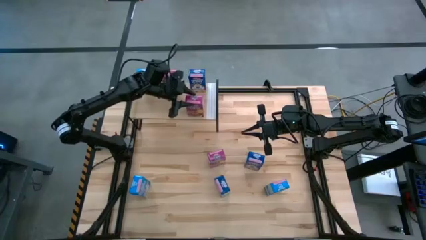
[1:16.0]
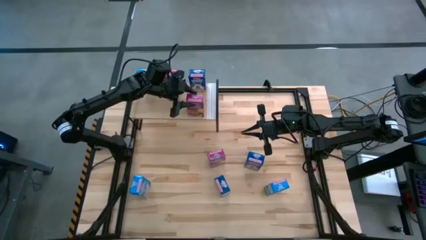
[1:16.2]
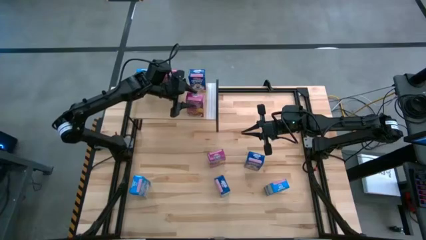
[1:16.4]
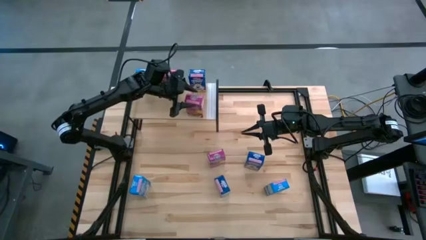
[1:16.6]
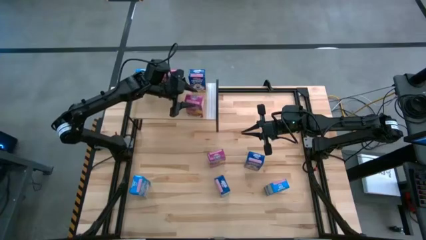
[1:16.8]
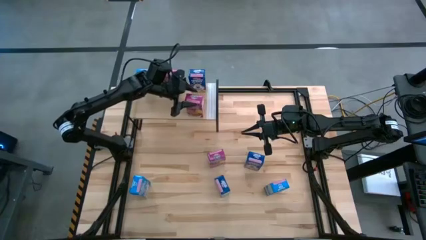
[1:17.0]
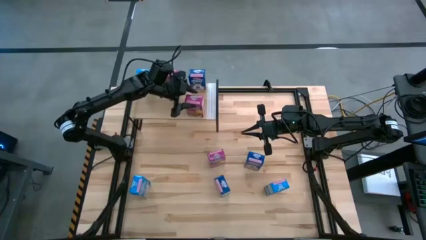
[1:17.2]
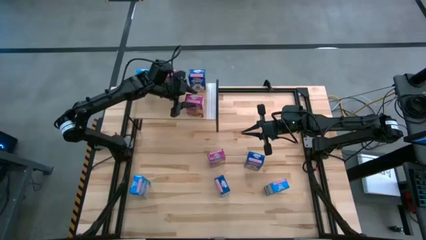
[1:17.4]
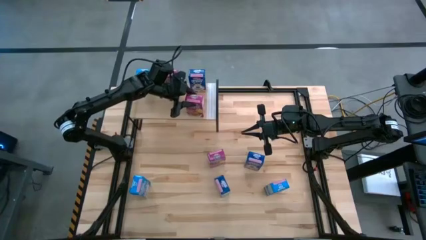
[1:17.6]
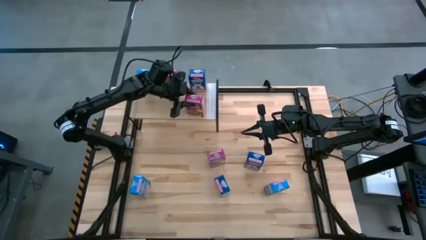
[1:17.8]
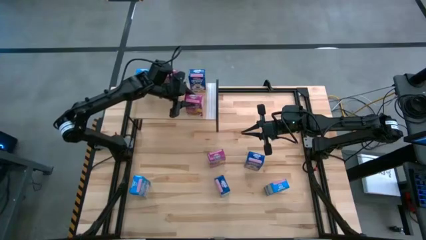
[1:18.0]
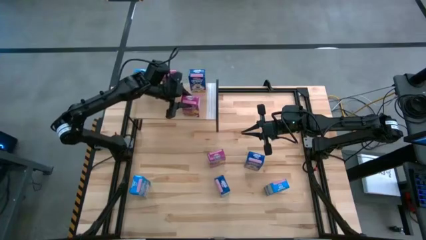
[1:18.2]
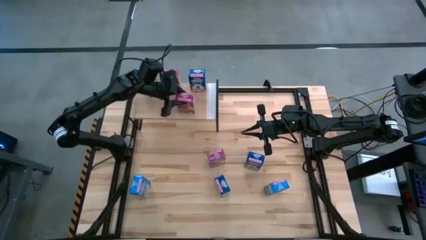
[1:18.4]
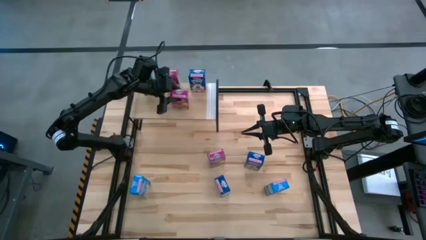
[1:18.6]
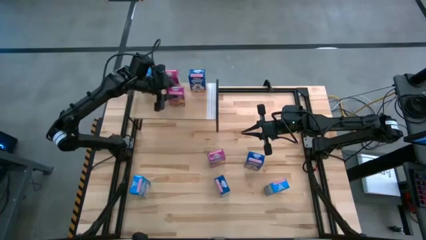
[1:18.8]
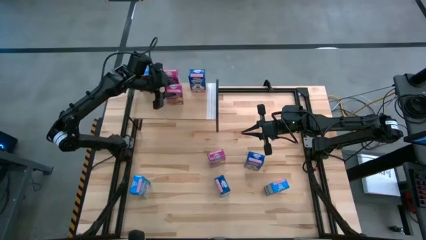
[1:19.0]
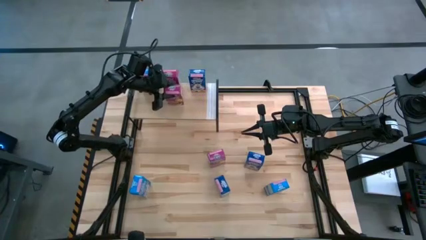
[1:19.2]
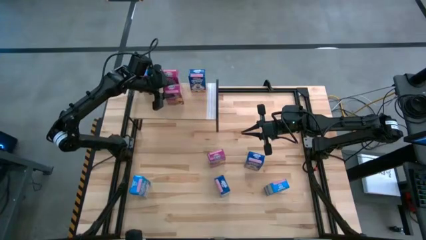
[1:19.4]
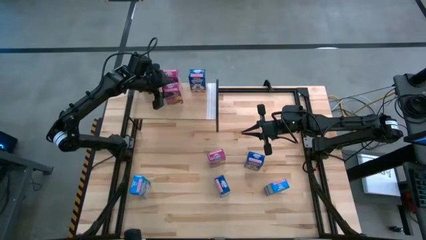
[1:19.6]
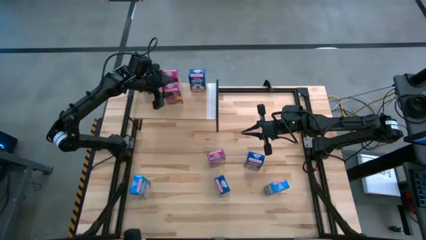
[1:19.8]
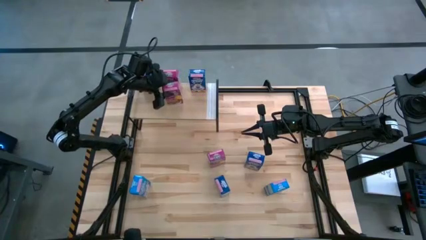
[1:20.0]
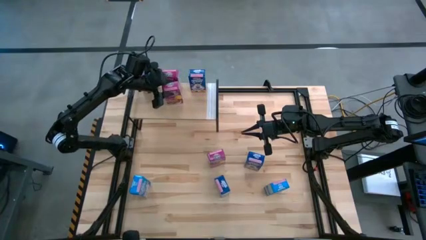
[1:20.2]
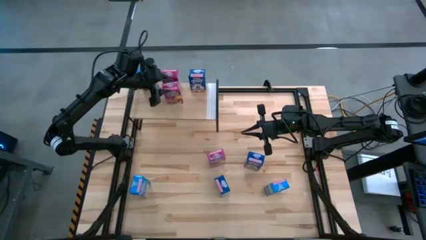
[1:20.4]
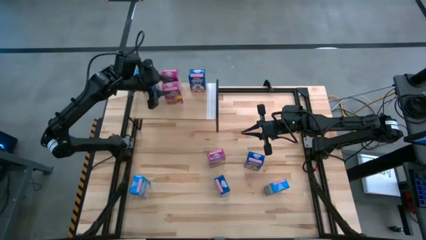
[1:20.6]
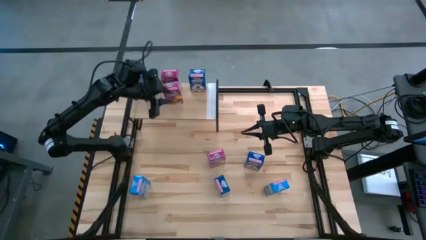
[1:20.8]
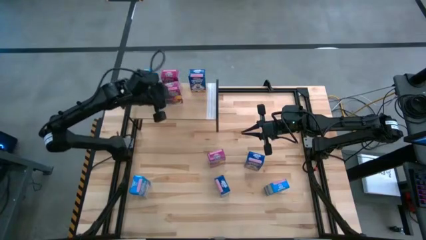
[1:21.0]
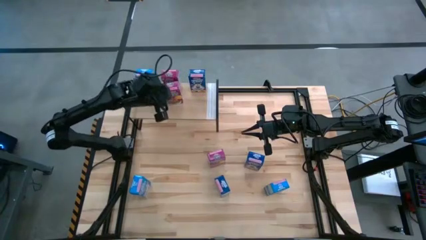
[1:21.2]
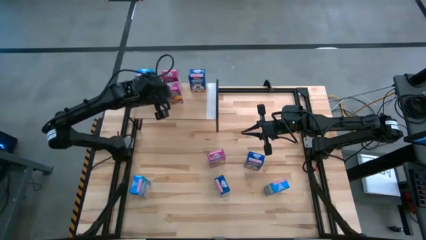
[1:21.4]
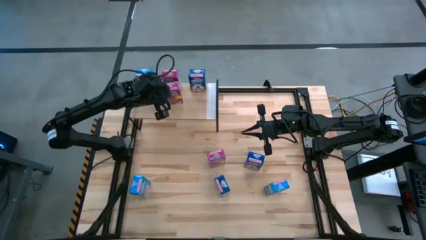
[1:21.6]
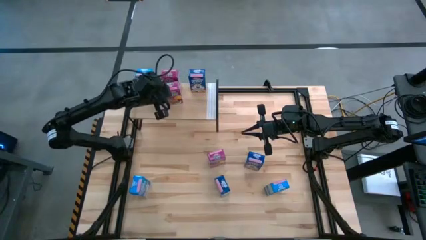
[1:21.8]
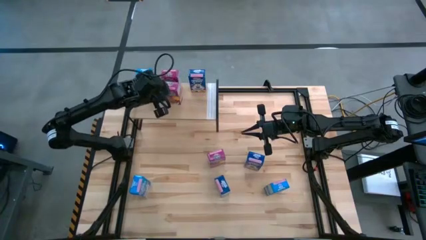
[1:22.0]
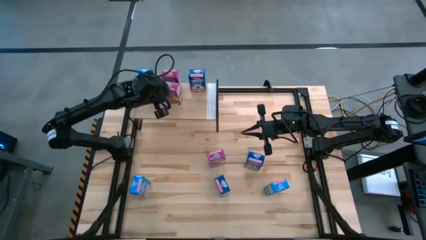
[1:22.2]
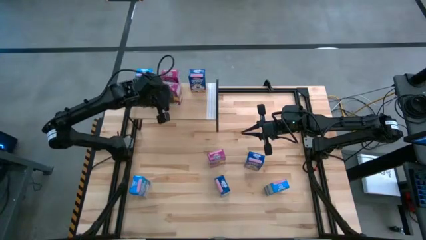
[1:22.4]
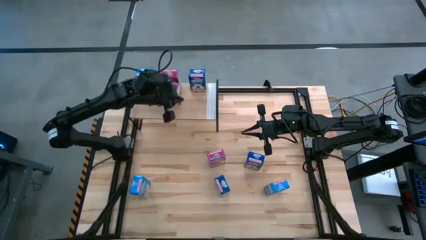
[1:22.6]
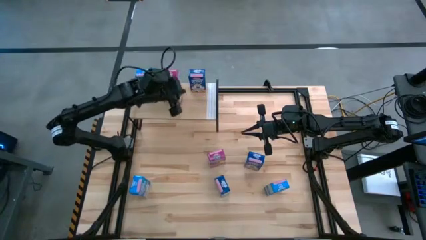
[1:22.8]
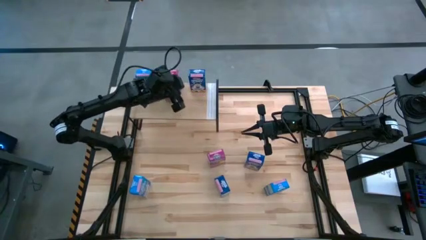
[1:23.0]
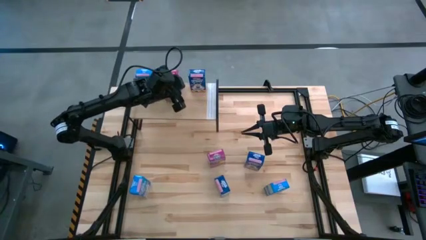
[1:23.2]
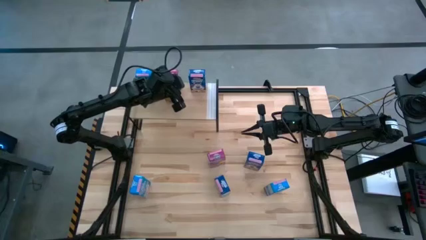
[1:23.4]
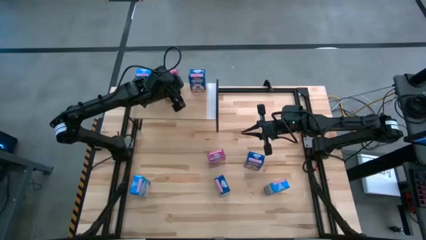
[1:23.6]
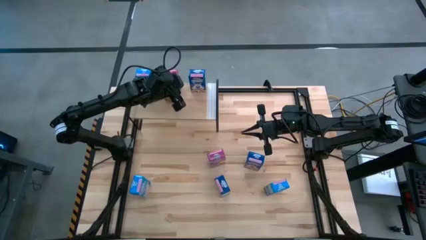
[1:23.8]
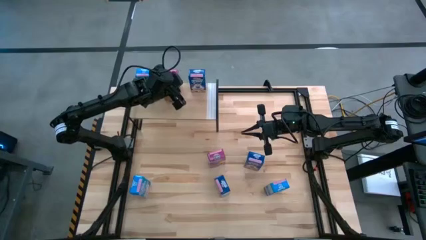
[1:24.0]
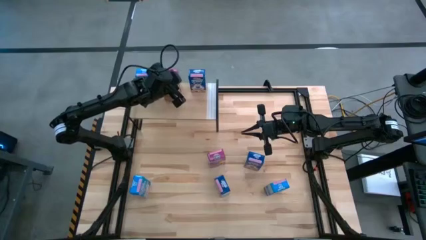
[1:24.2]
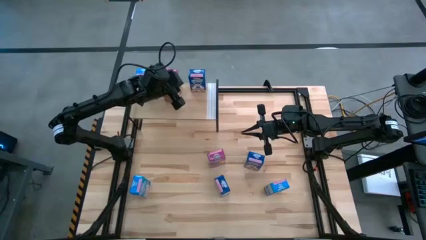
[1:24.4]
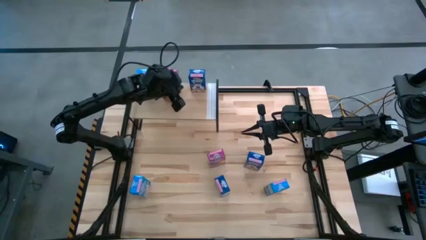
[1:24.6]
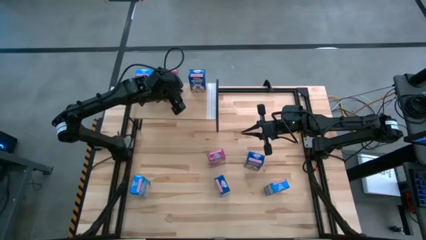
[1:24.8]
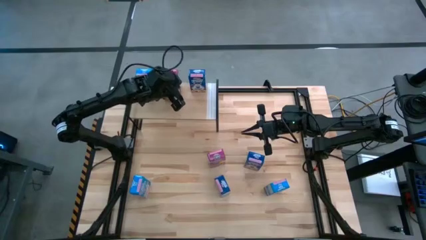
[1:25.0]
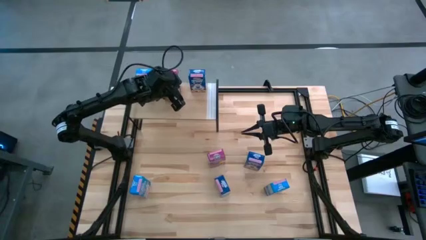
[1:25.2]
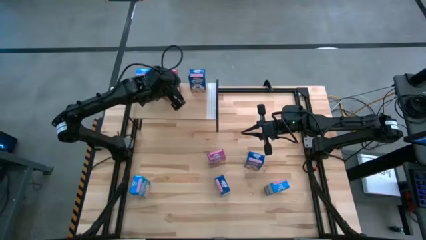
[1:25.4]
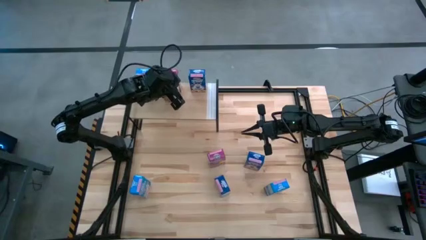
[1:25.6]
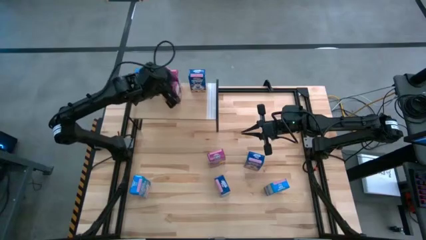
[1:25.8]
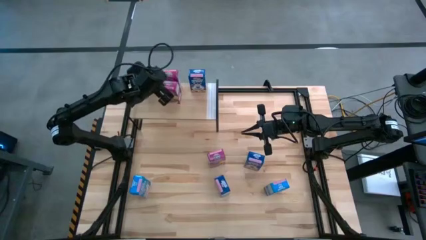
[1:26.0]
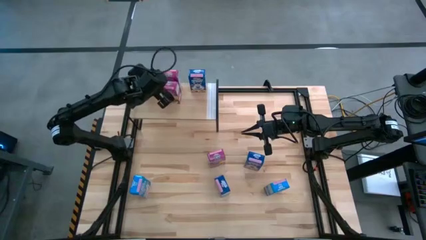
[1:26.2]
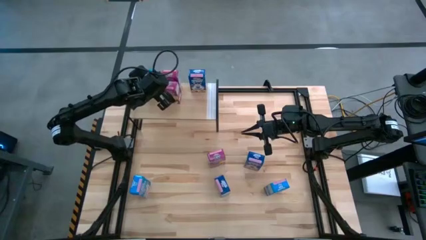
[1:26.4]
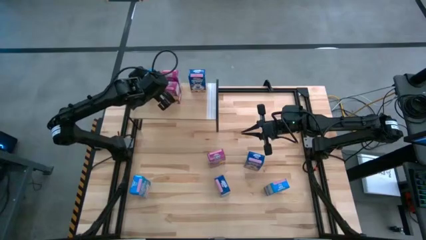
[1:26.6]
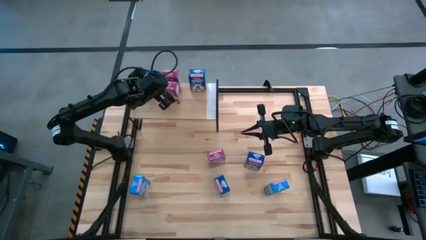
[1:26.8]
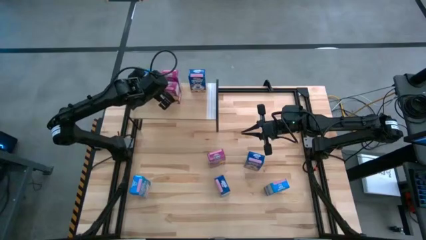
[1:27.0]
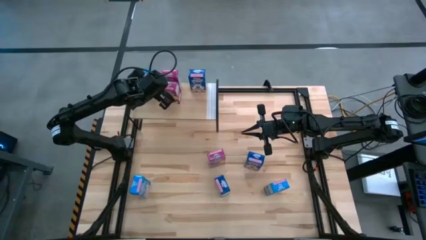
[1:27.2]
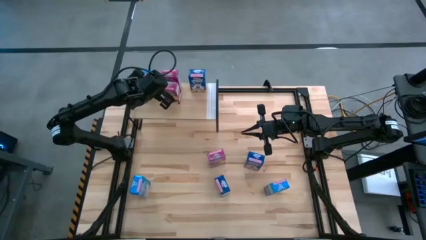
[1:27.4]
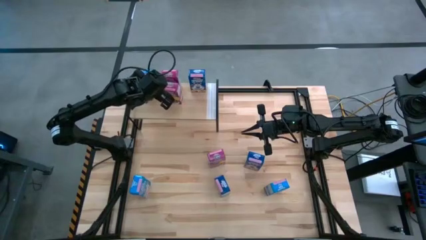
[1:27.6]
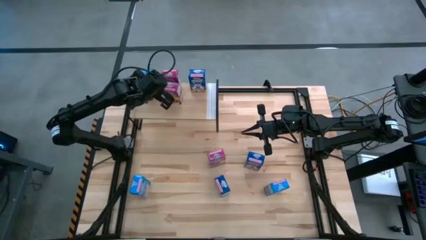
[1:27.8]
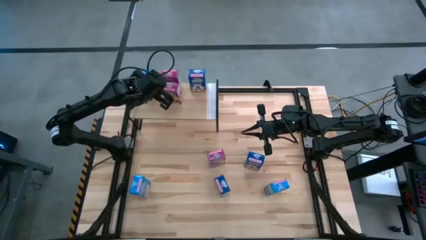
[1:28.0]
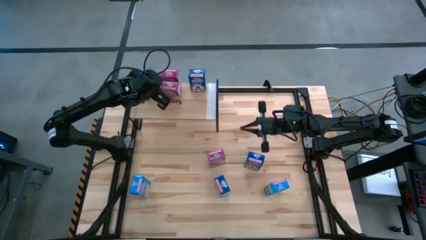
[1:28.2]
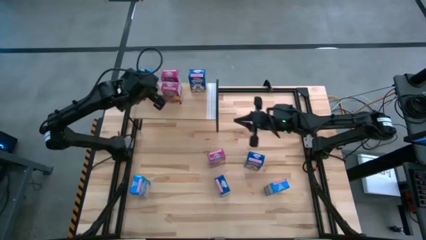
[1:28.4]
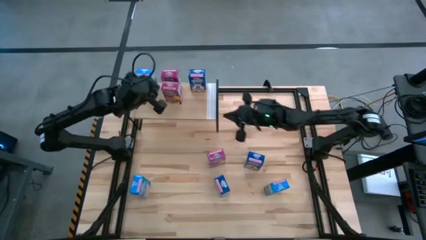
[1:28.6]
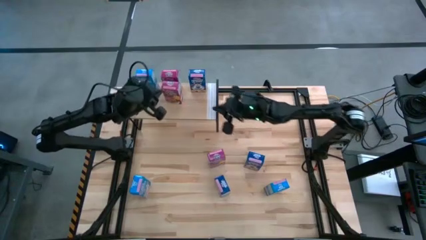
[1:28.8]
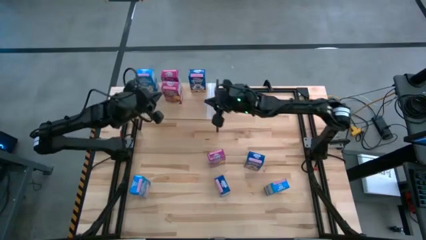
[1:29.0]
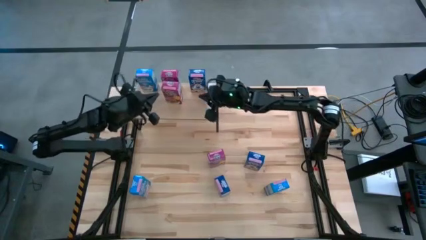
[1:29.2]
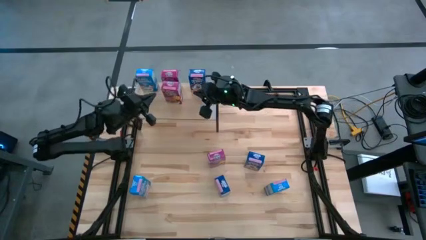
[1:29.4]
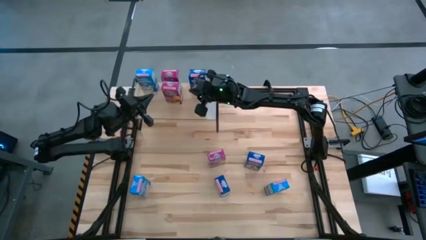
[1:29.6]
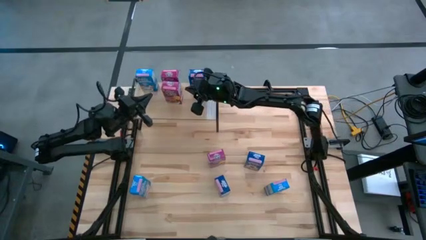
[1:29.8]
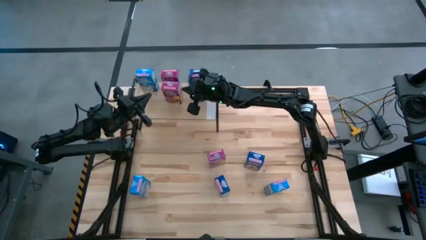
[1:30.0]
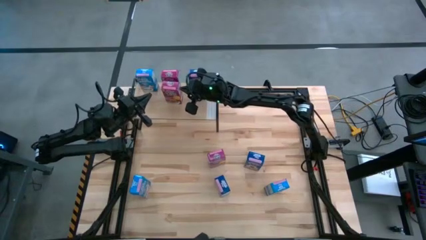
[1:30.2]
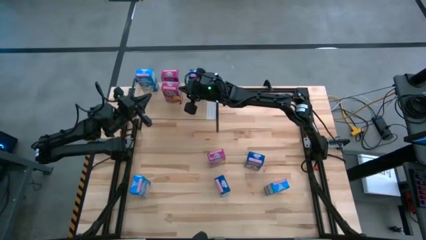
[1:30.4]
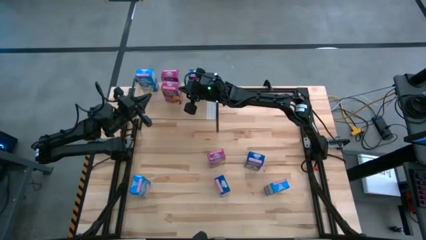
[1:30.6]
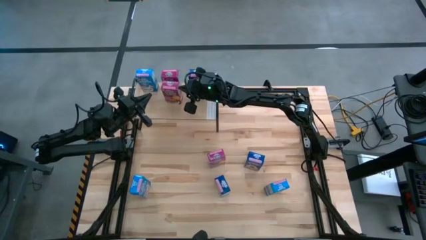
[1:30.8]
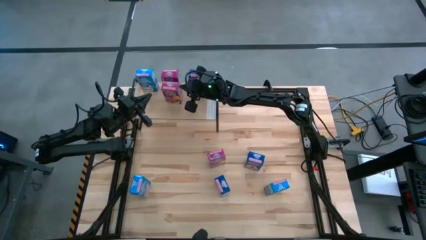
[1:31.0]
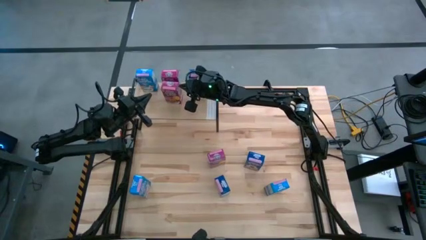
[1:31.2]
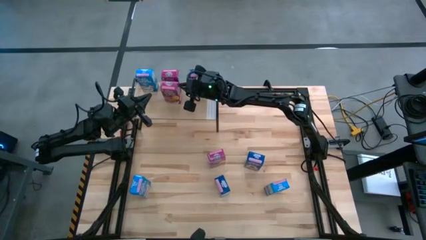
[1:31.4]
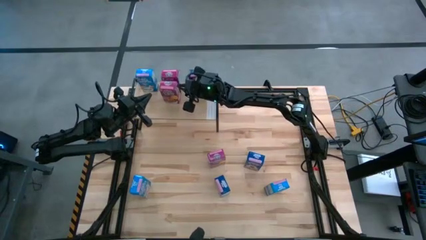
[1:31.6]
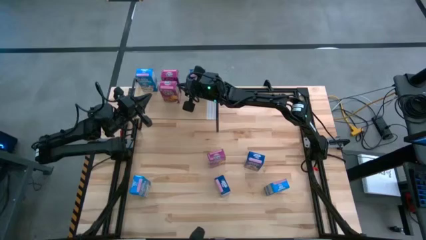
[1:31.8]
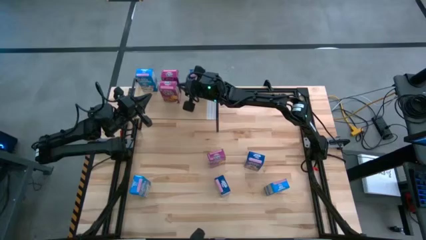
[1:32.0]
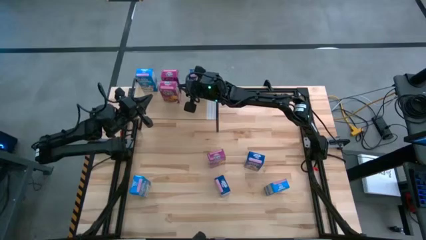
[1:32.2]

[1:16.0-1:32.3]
Task: Stack cereal on shelf
Put the top pink cereal box on the shelf

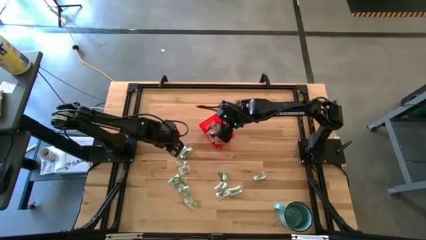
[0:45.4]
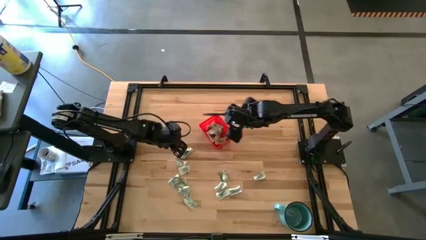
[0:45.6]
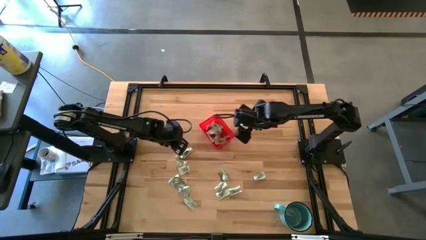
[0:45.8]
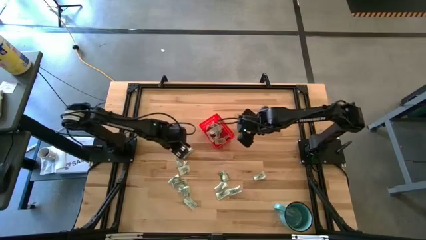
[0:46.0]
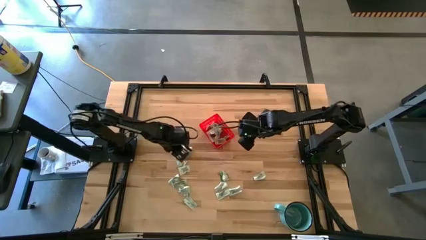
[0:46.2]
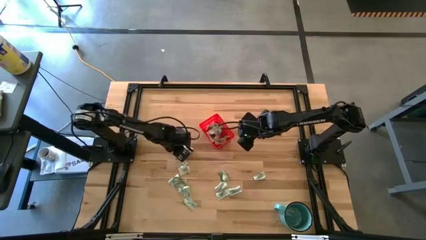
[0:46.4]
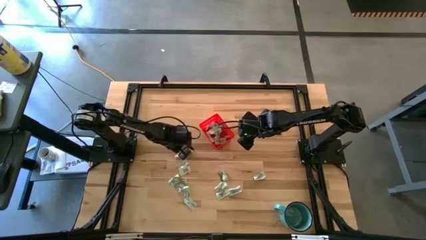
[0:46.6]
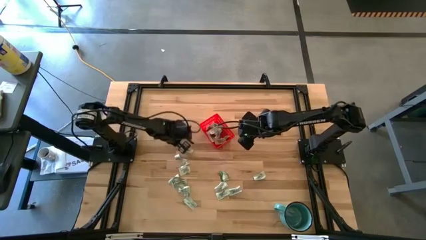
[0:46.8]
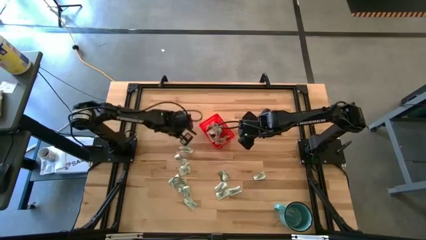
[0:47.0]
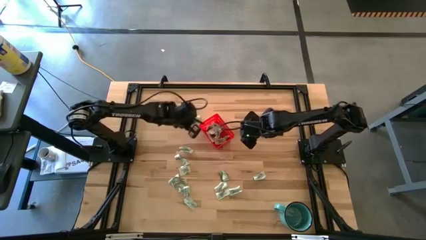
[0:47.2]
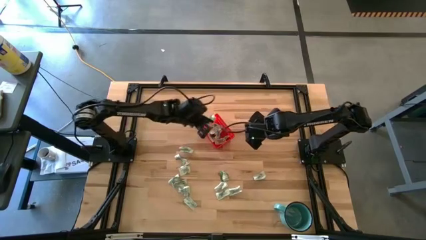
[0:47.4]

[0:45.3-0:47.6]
Task: Pick and place Stevia / Truvia into bins
Put the stevia packet into the red basket
